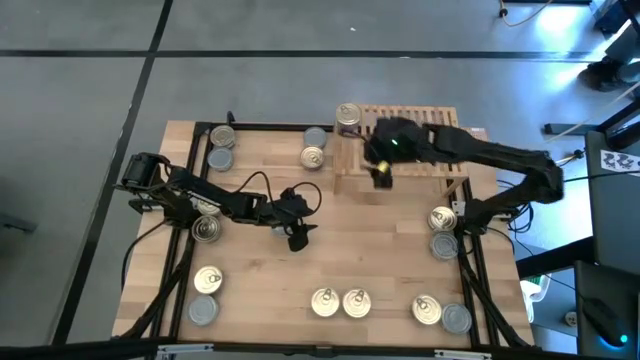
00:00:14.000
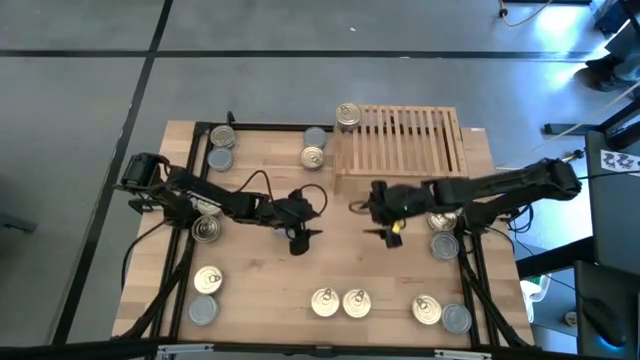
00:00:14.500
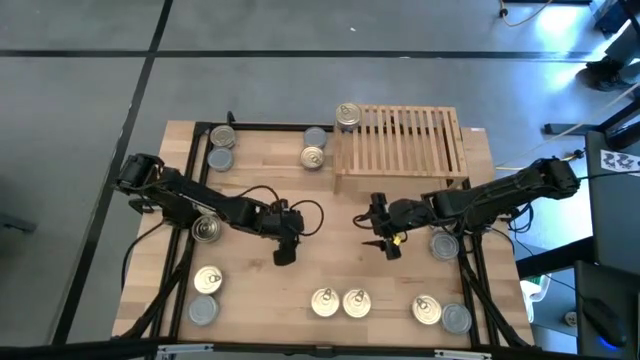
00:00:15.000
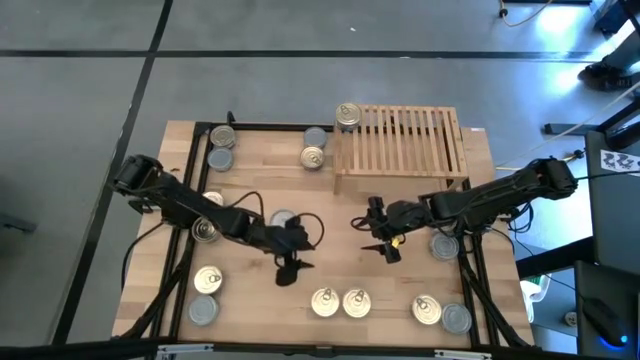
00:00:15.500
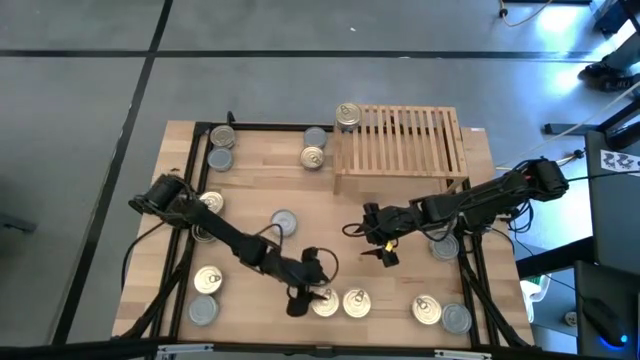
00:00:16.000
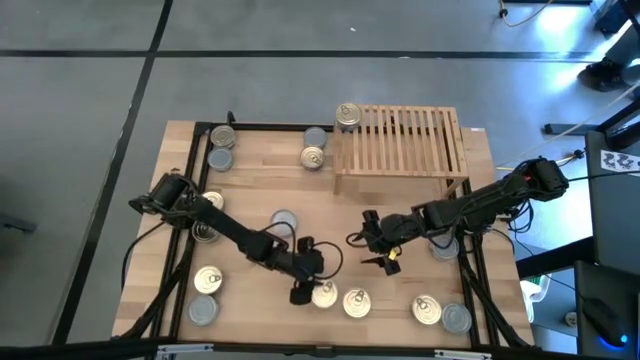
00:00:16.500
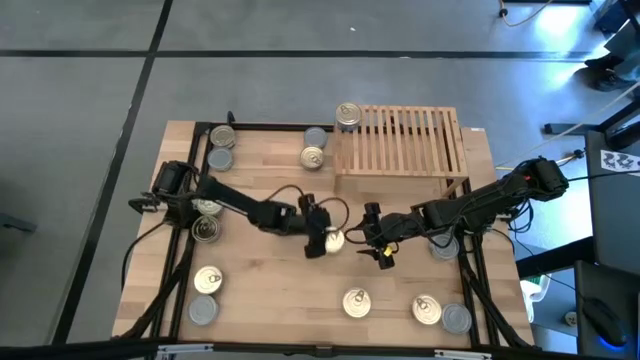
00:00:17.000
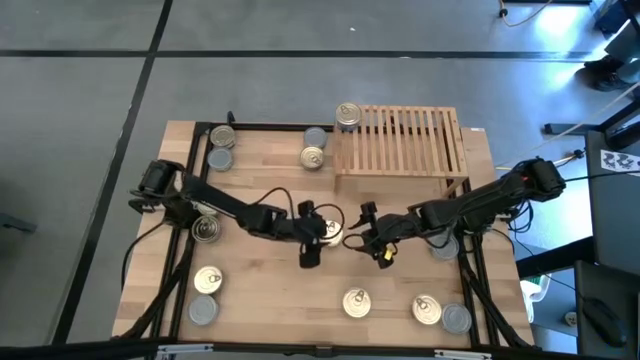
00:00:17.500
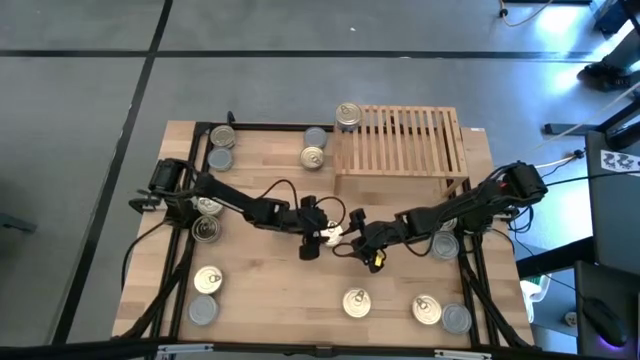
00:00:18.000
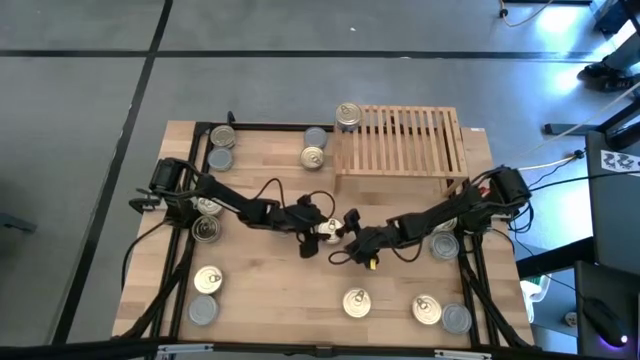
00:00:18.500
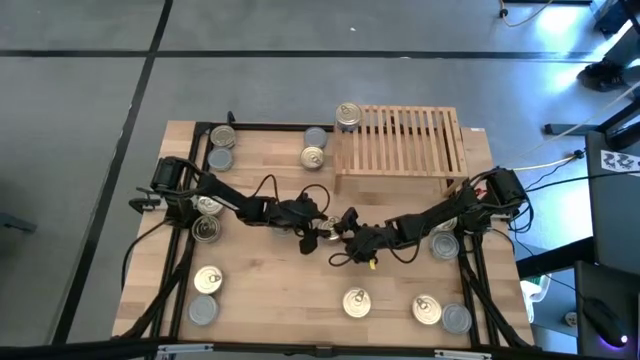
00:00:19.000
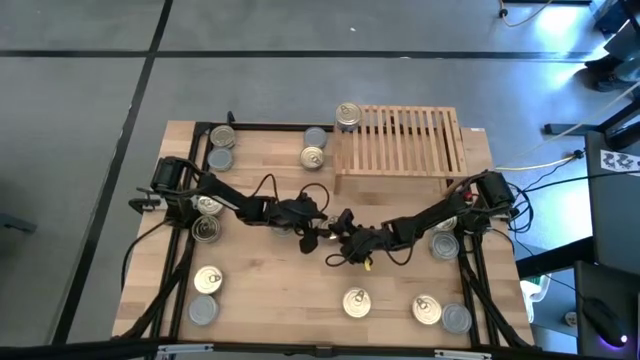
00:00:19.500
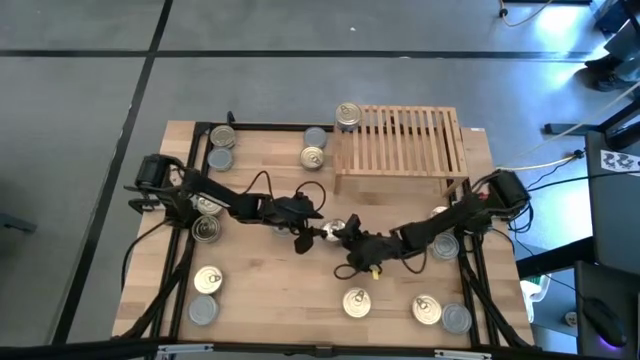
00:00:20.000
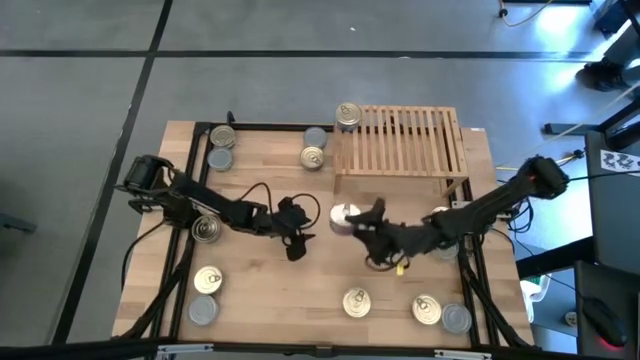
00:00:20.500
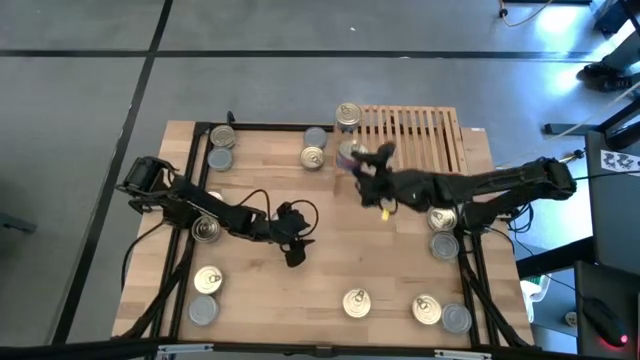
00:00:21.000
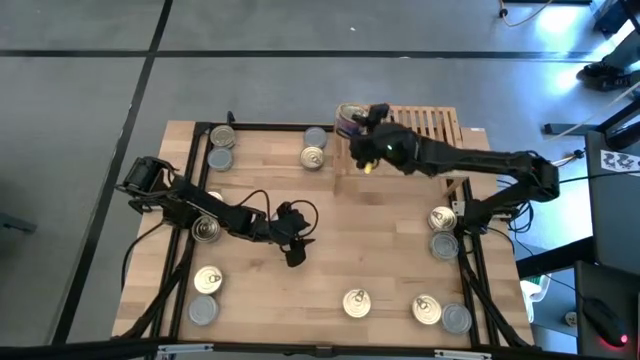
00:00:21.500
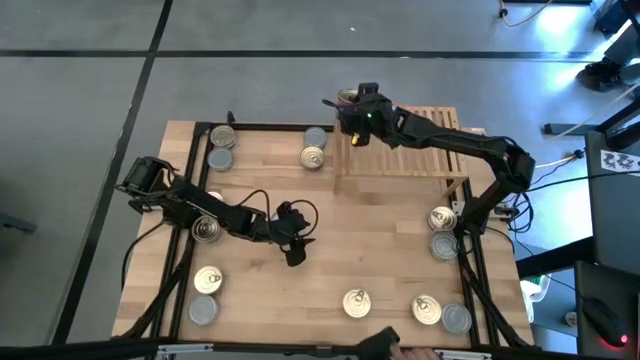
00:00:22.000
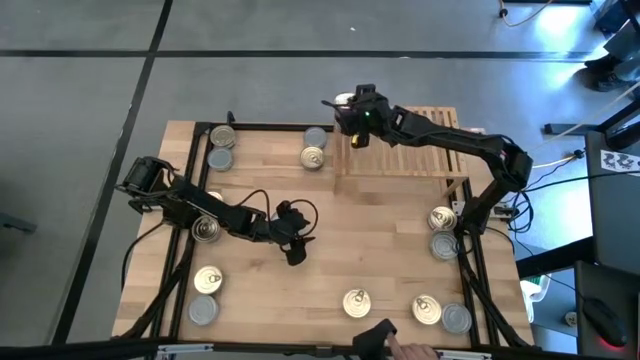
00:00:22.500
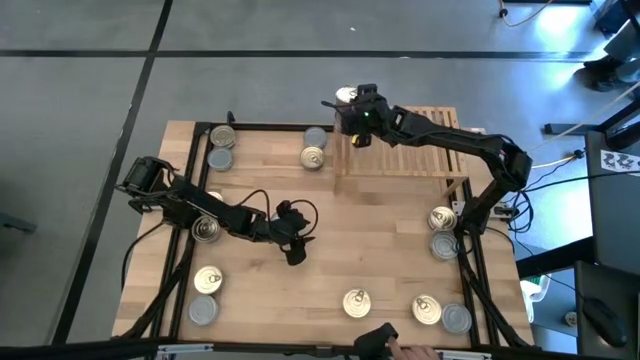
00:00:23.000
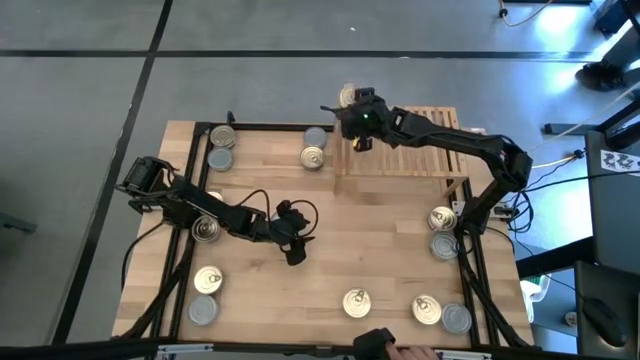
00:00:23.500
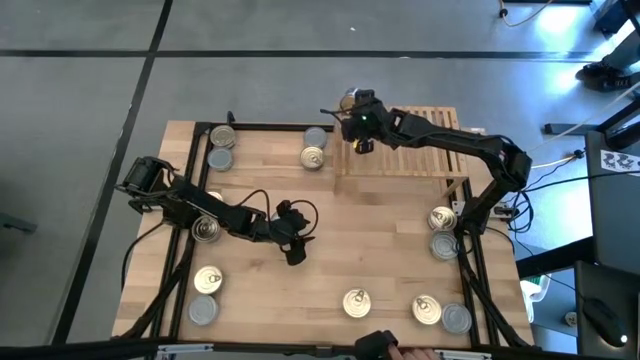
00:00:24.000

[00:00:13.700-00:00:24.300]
Task: Stack canned seafood by type on shelf
Stack the blue-pink tuna can on top of the blue-pink tuna can on the shelf

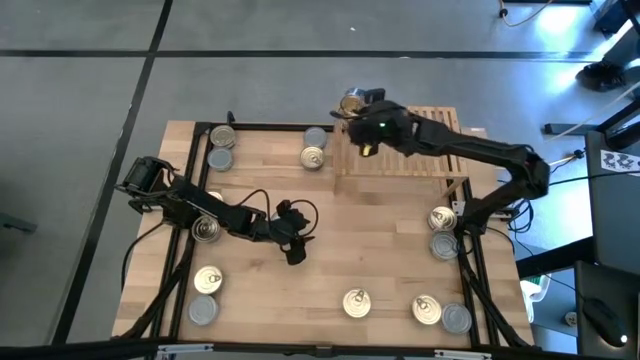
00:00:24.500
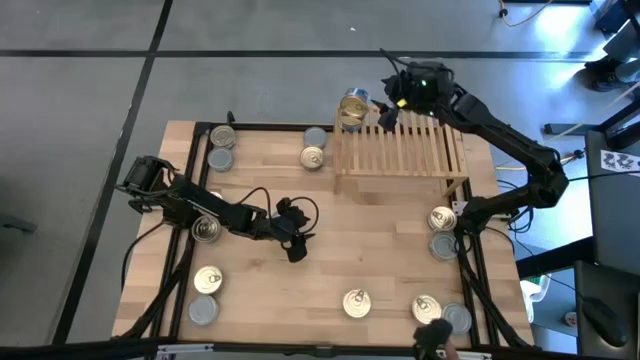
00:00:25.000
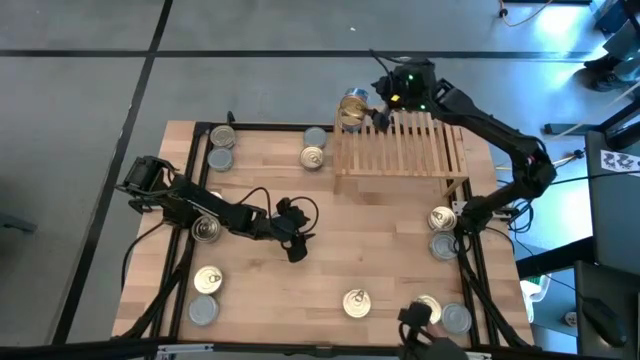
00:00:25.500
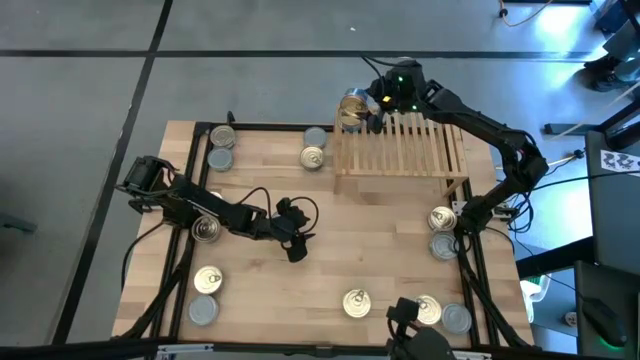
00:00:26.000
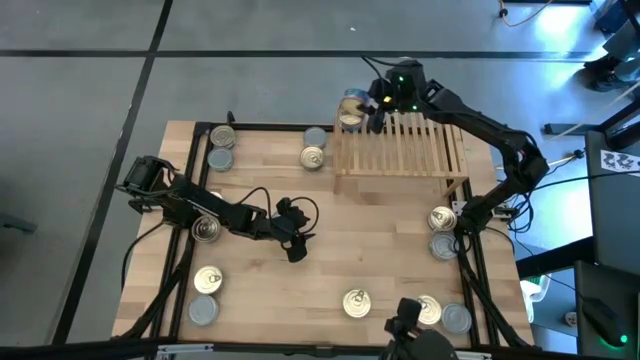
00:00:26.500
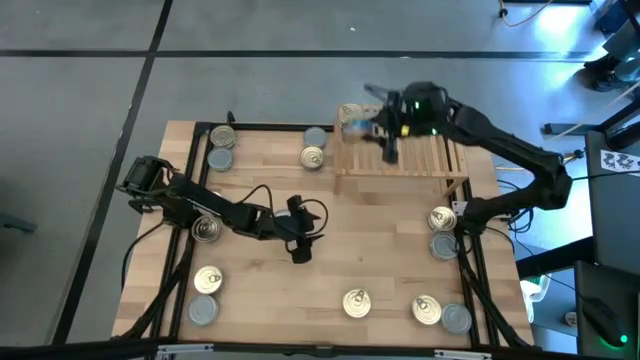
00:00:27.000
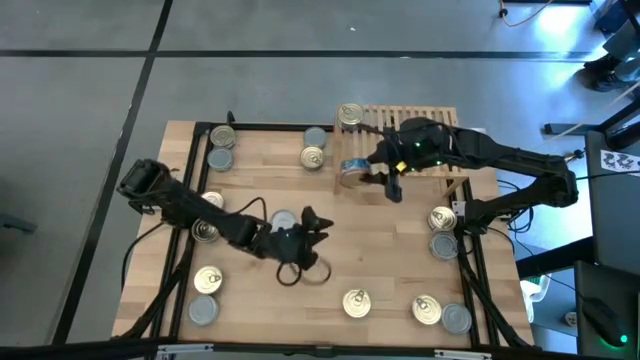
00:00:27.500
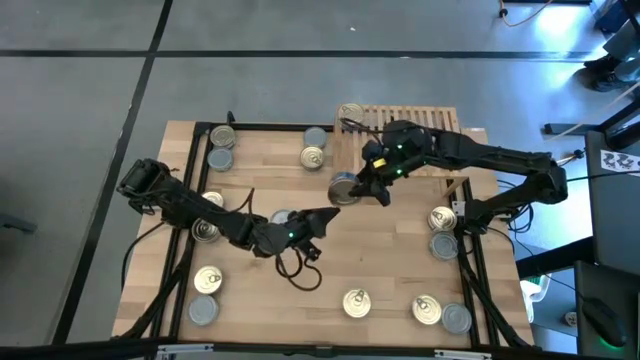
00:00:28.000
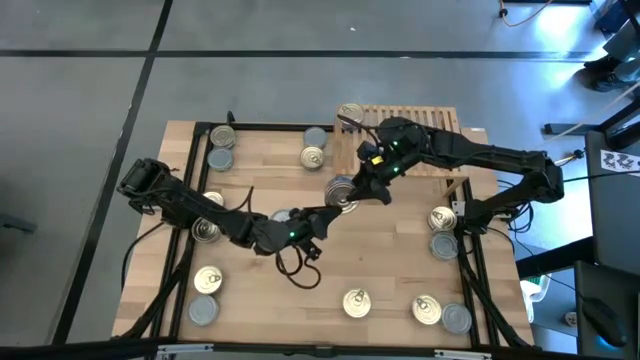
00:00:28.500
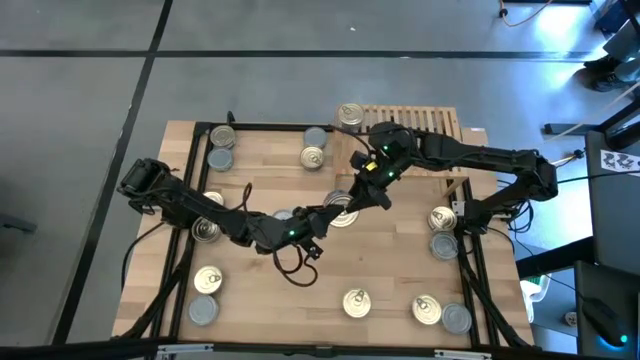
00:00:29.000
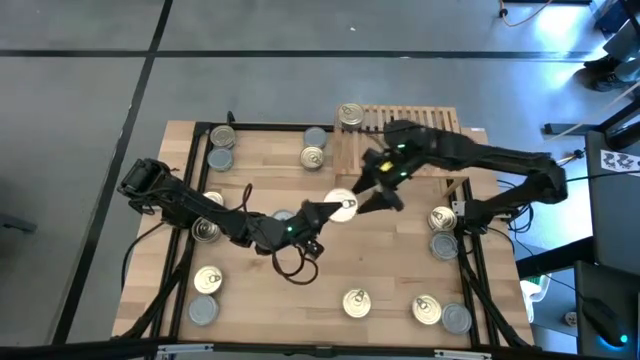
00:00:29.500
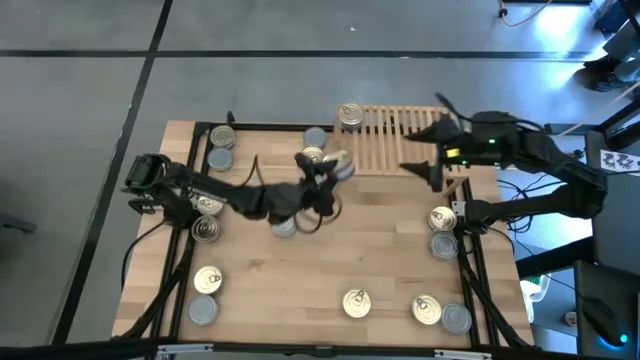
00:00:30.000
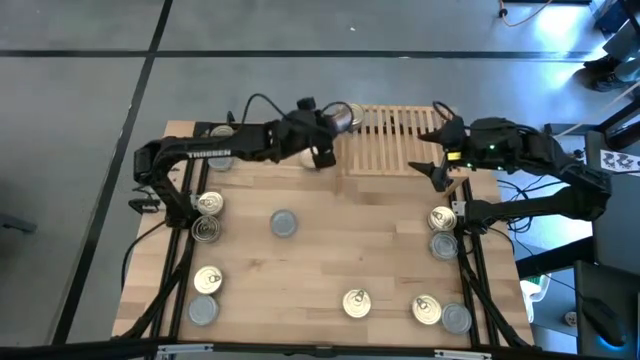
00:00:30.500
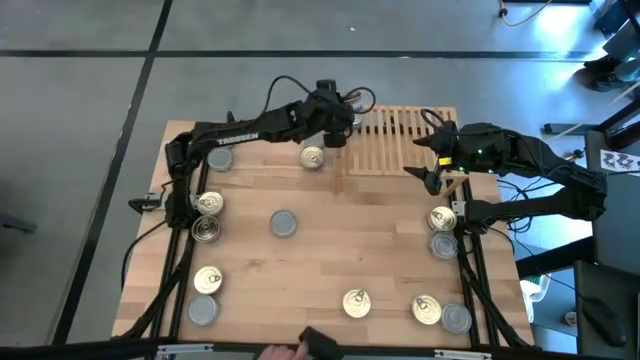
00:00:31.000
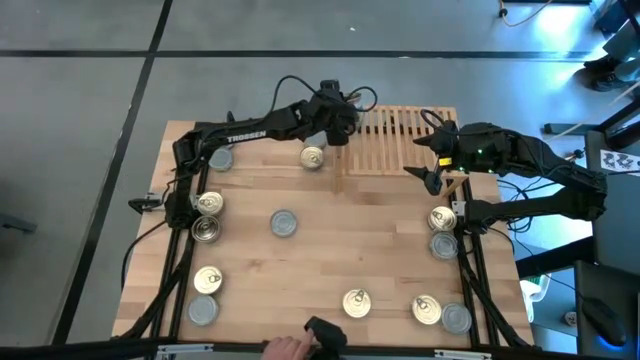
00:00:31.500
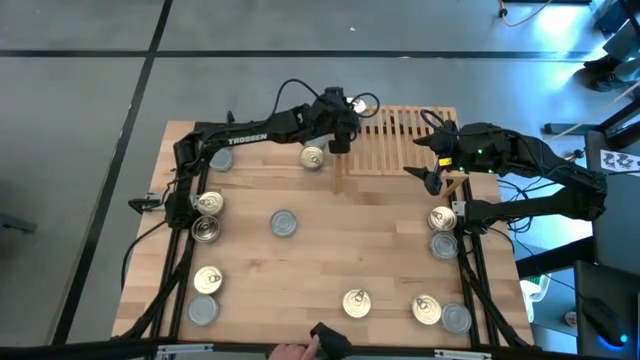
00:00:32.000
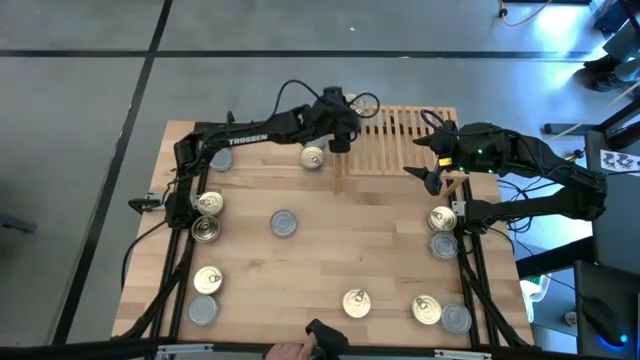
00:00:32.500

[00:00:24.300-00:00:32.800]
Stack the blue-pink tuna can on top of the blue-pink tuna can on the shelf

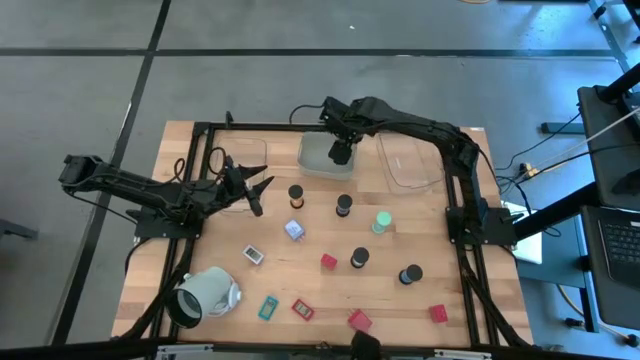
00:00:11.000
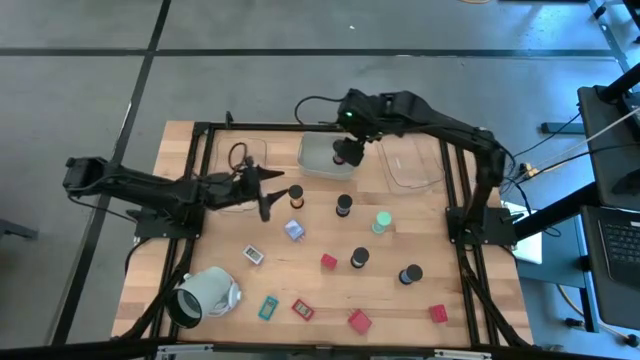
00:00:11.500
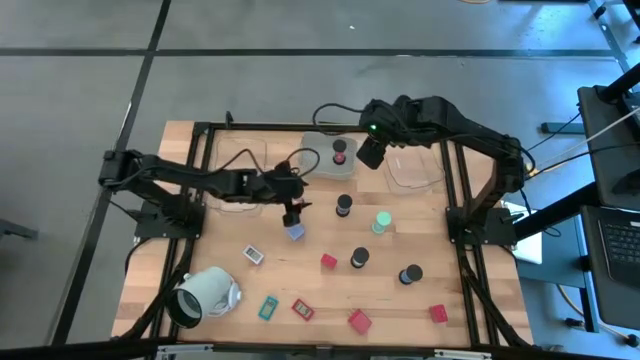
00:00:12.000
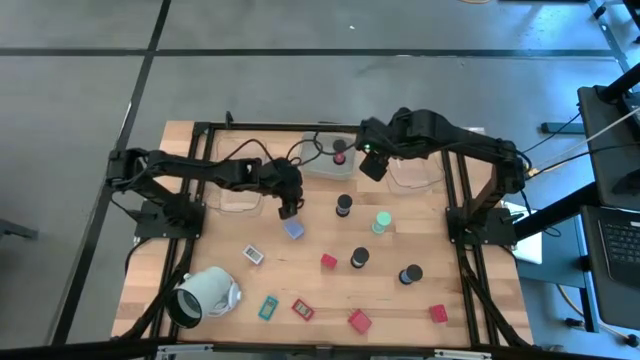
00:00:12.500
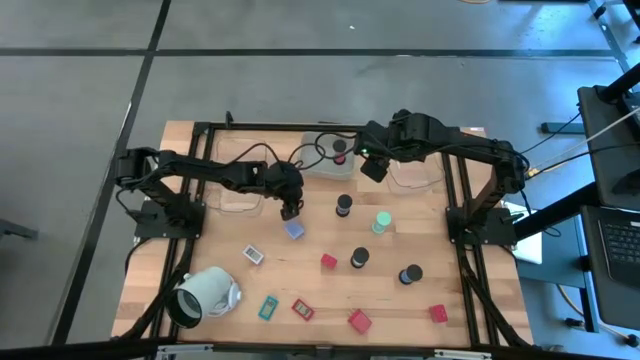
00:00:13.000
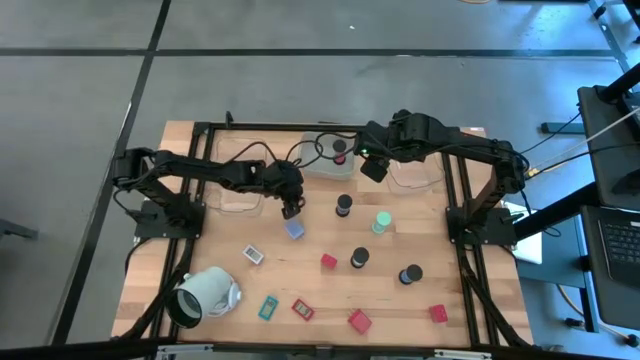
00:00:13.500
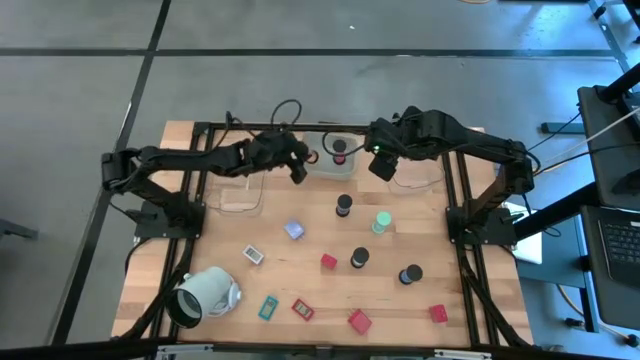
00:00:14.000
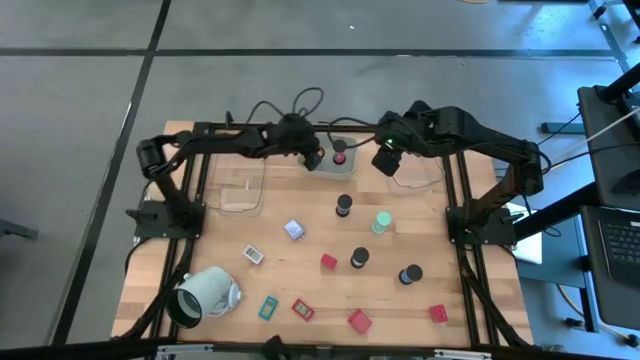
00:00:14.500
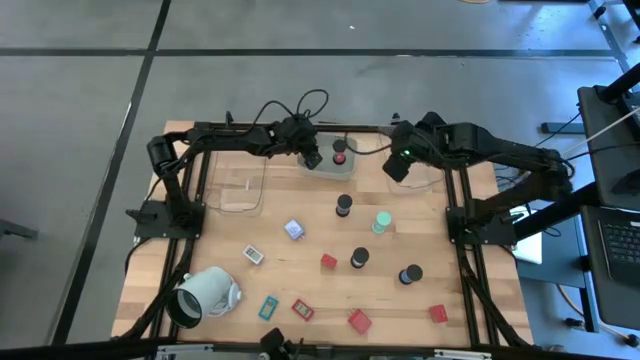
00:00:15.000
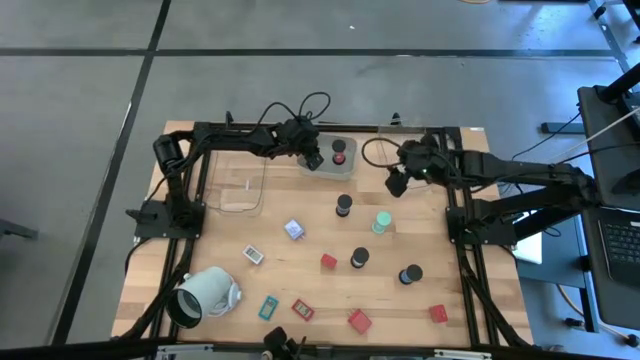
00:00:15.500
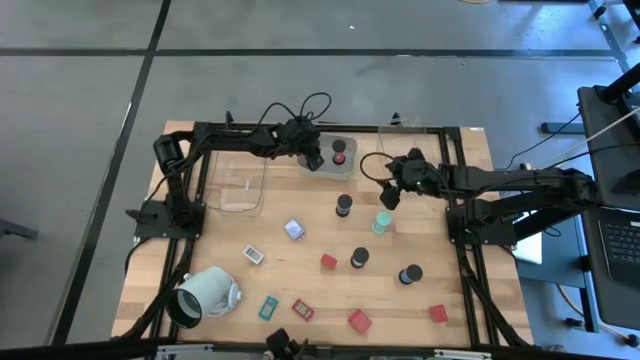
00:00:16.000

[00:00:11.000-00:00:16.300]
Task: Pick & Place Office items
Put the yellow hourglass timer into the gray bin
